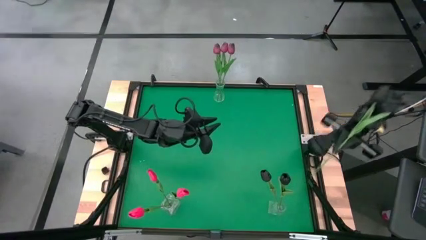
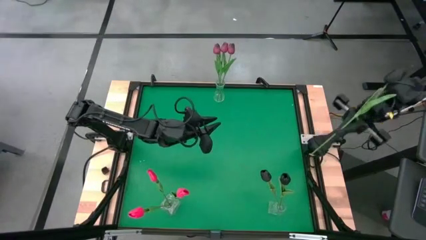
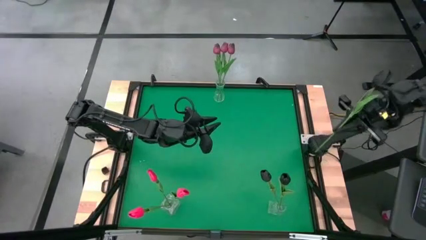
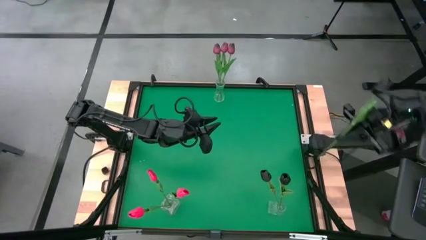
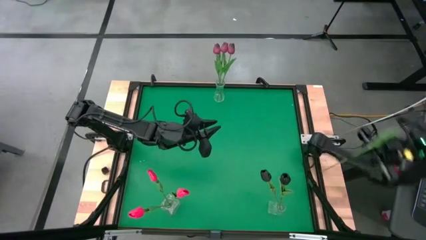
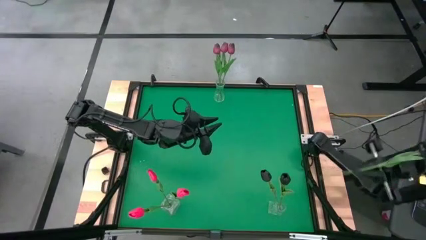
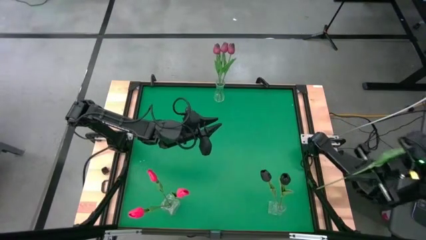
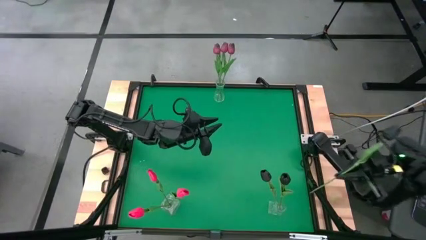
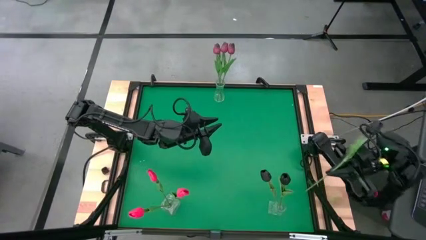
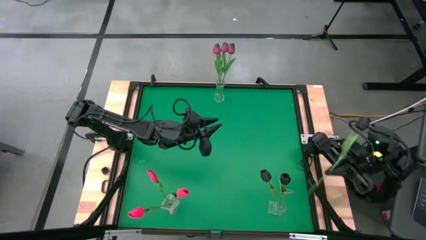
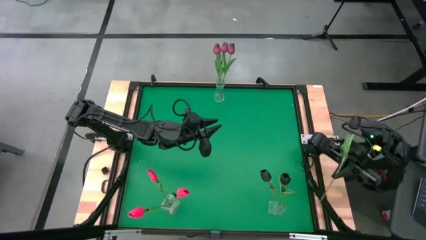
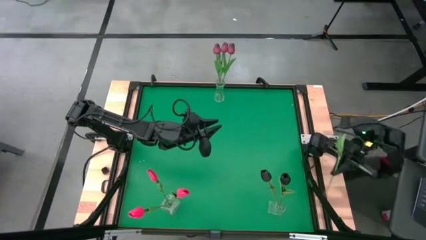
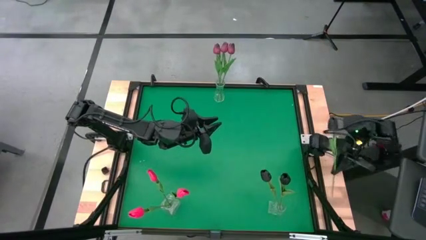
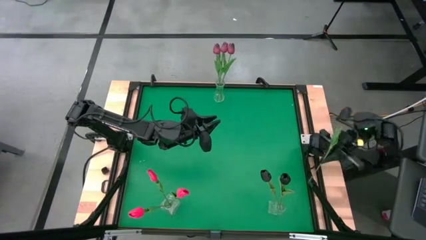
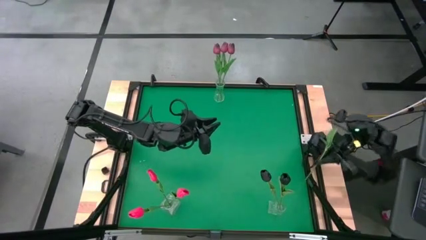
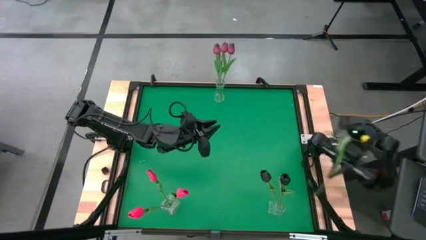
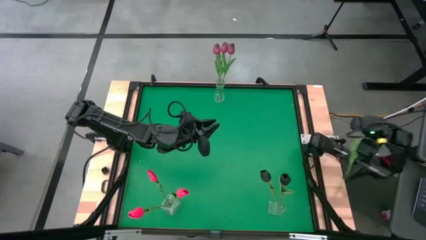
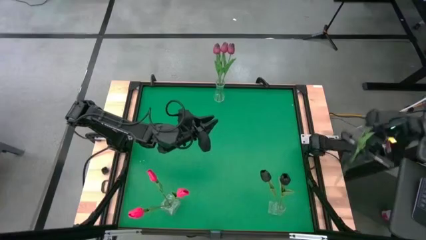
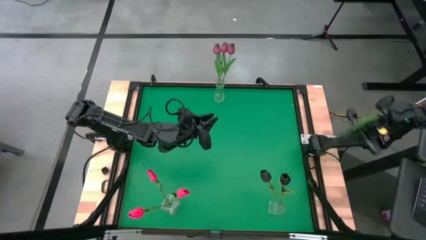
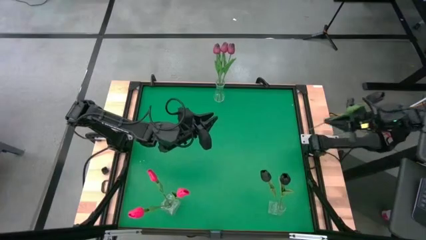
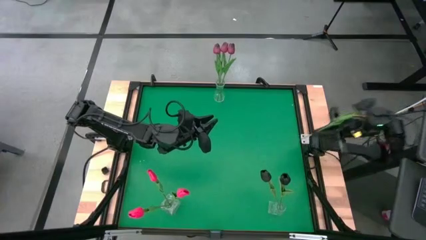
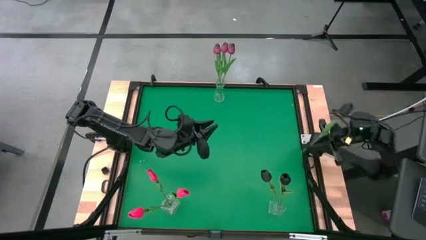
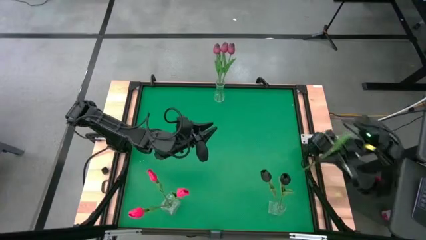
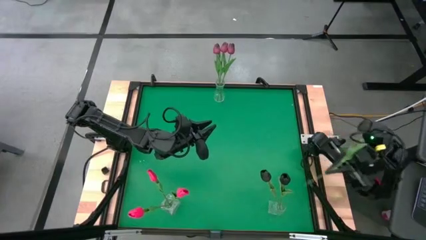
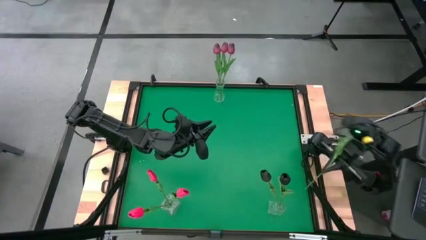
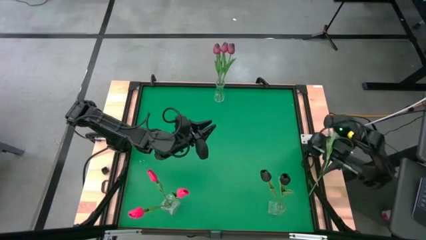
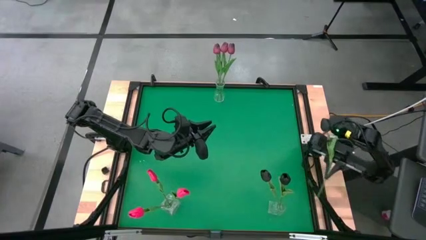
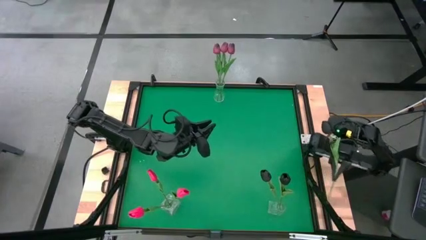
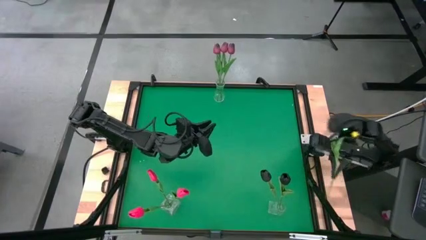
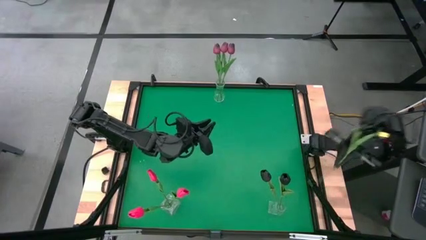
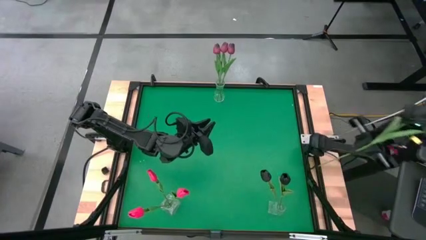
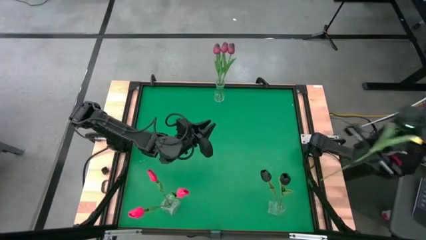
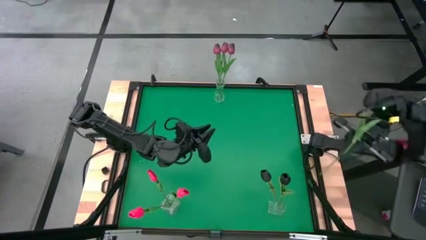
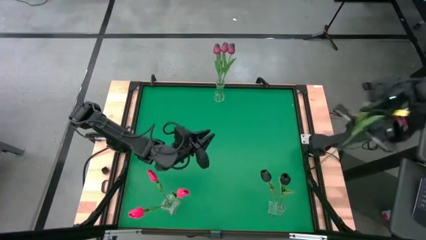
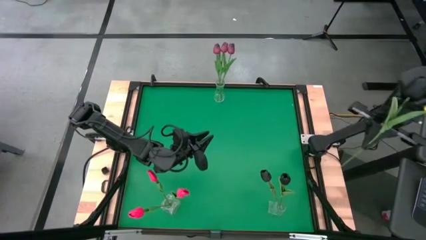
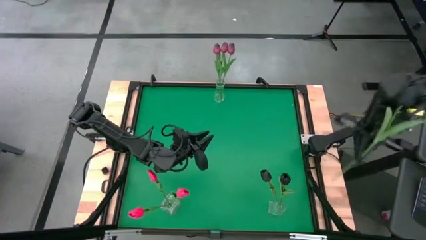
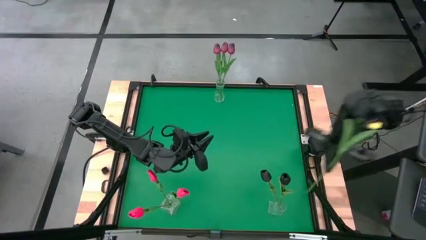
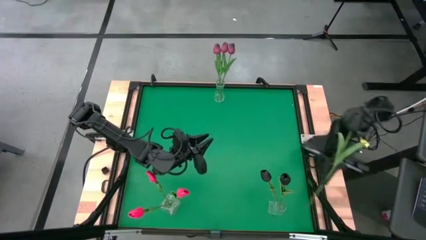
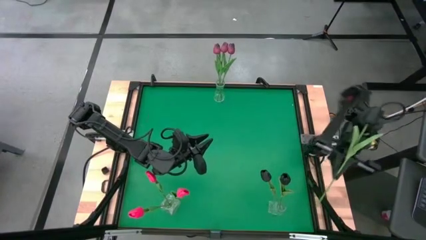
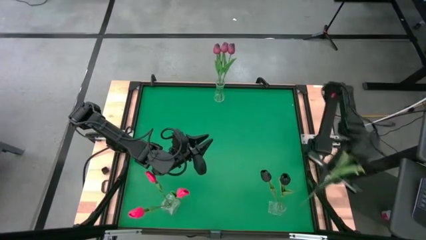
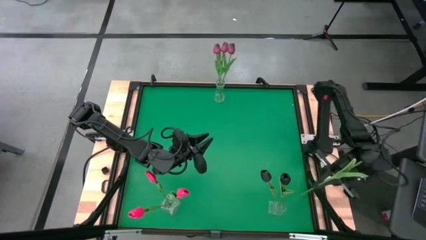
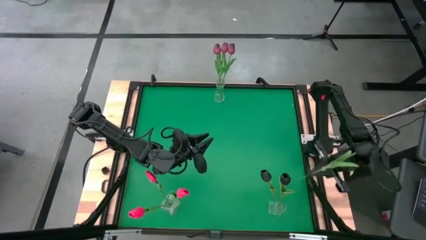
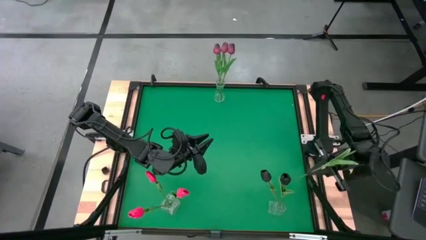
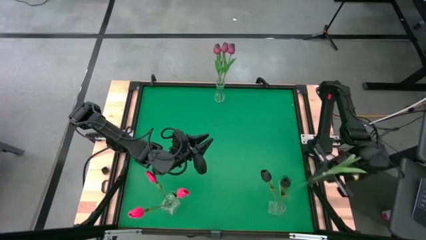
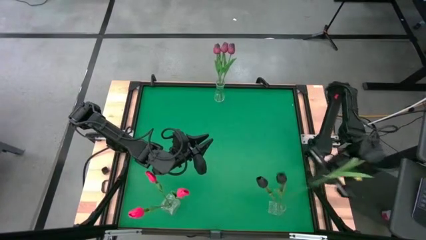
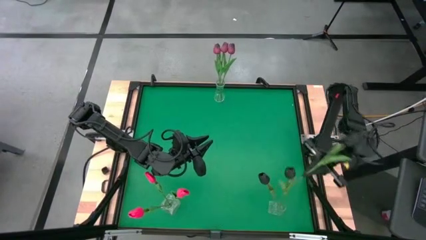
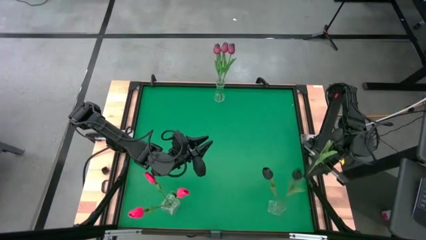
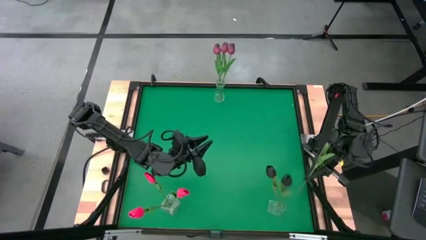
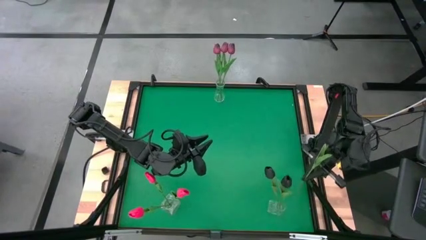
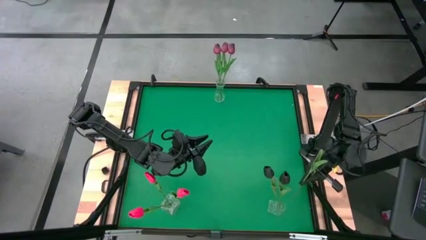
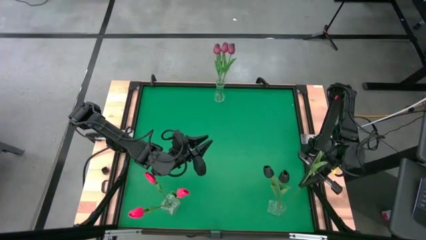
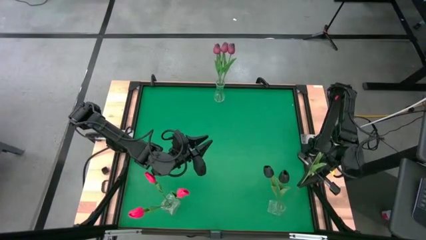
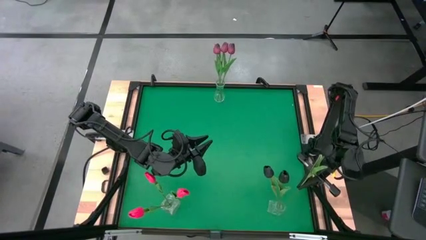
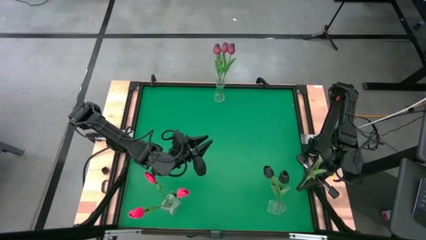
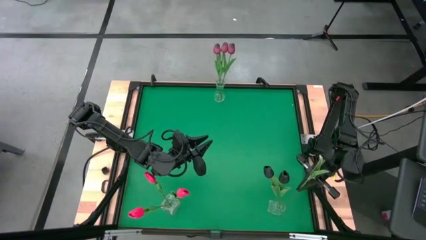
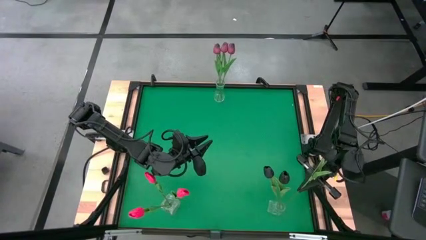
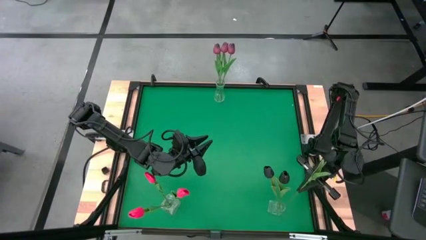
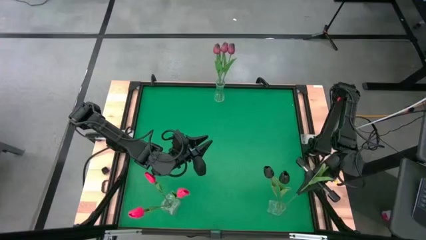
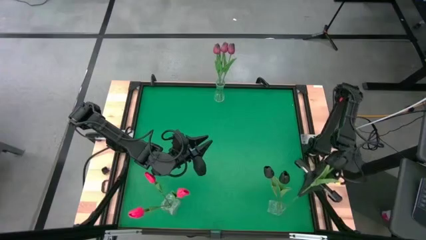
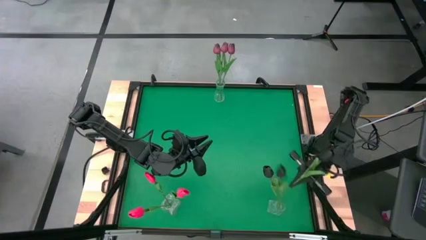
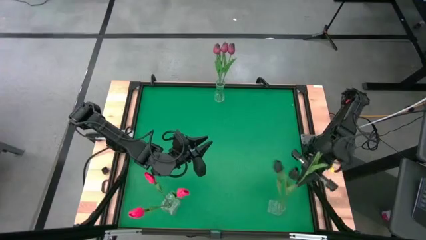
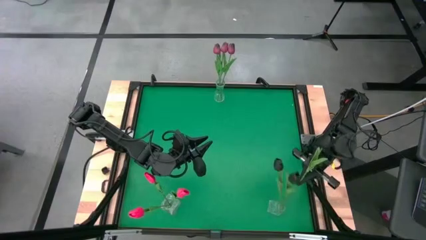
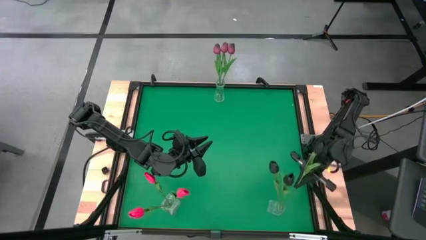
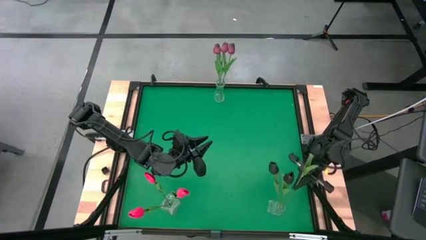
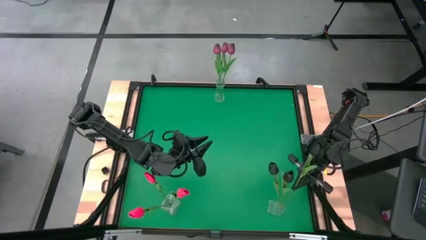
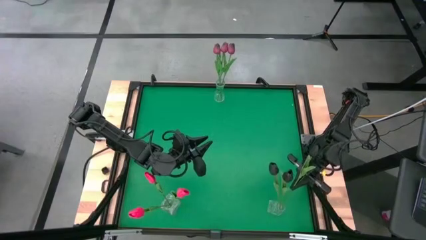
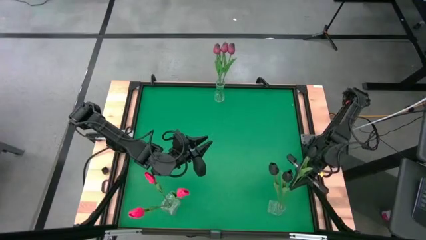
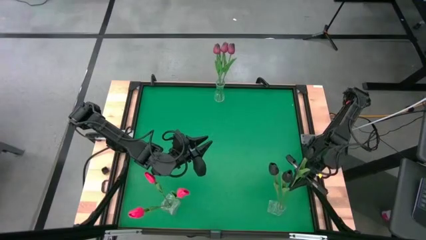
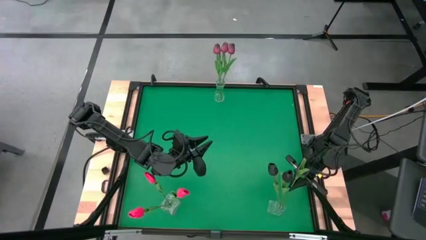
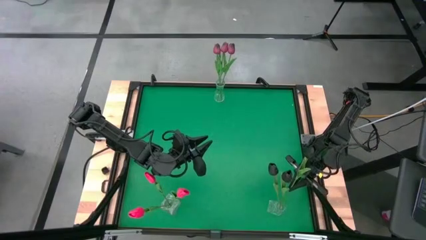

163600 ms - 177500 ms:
Task: Sort flowers into vase by color
Put the black tulip into the bottom right transparent vase
